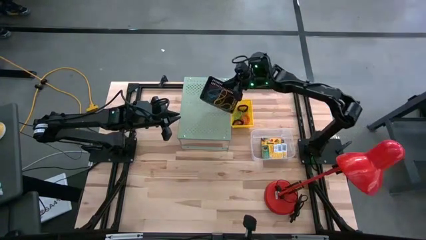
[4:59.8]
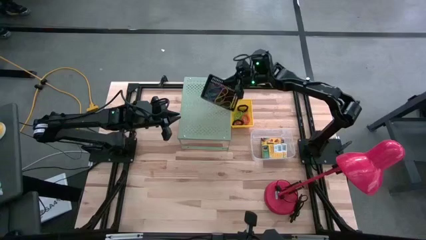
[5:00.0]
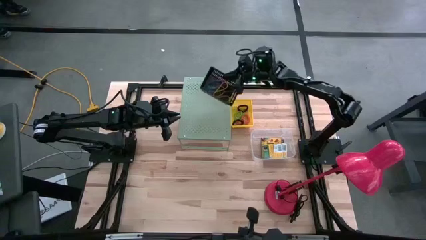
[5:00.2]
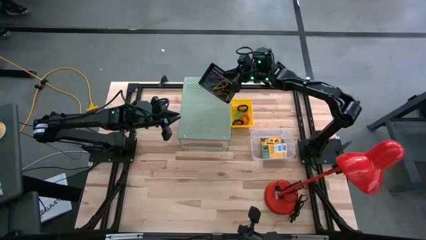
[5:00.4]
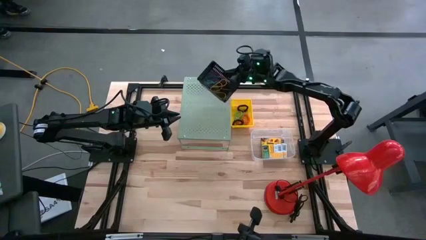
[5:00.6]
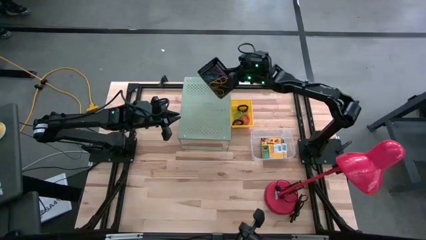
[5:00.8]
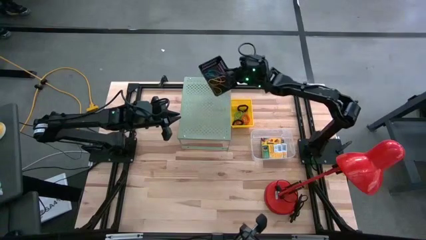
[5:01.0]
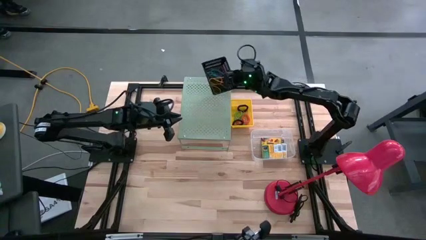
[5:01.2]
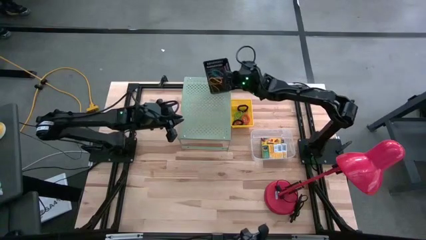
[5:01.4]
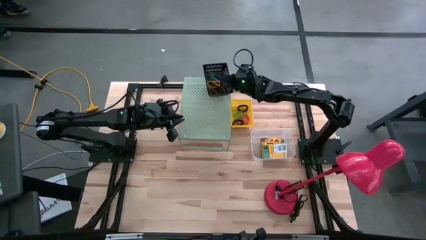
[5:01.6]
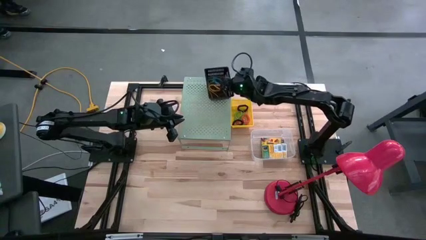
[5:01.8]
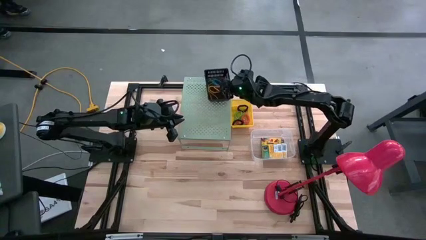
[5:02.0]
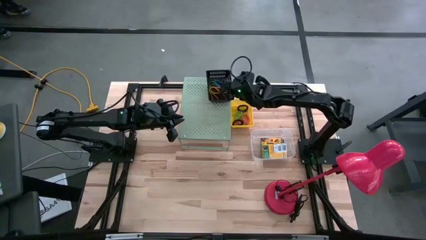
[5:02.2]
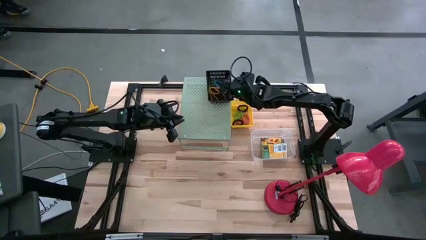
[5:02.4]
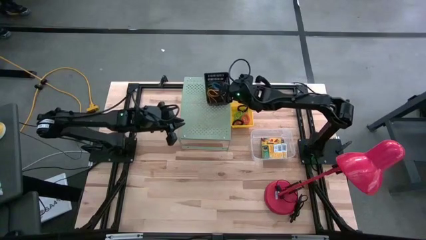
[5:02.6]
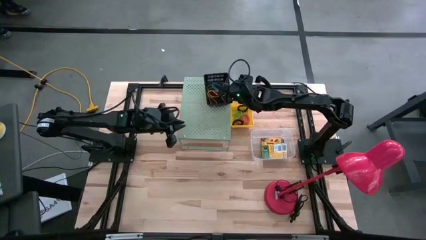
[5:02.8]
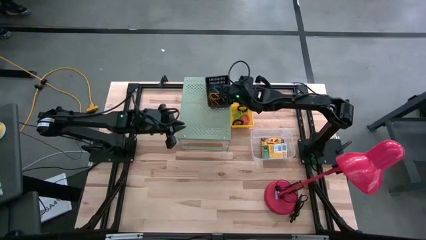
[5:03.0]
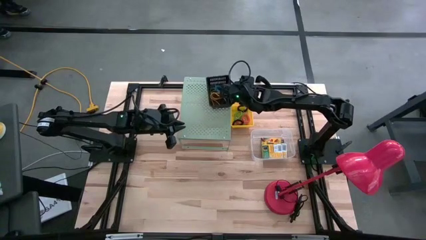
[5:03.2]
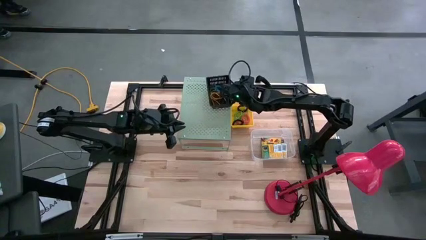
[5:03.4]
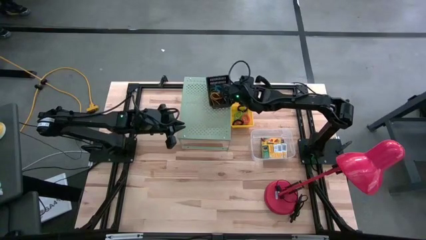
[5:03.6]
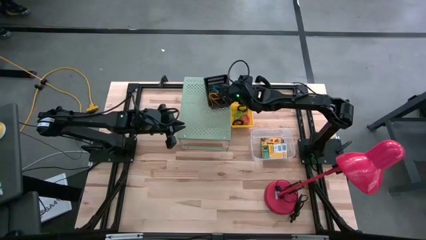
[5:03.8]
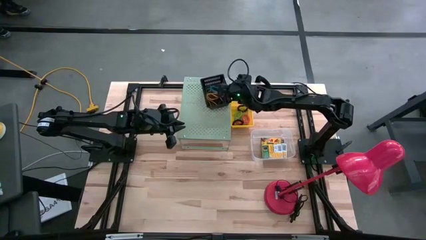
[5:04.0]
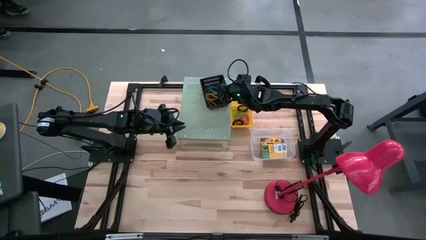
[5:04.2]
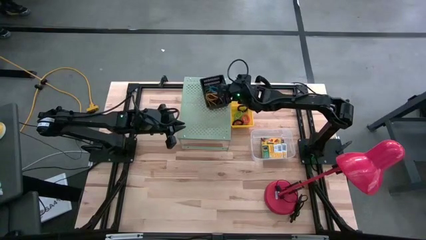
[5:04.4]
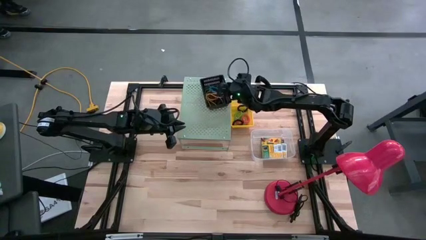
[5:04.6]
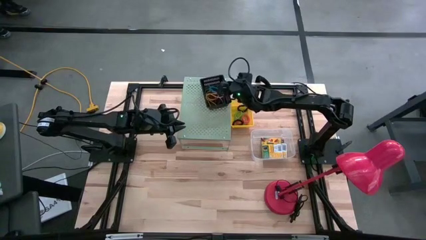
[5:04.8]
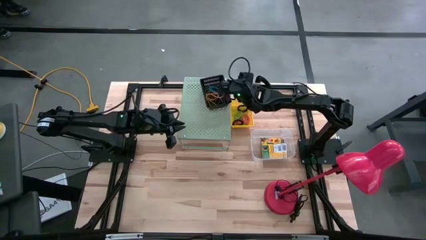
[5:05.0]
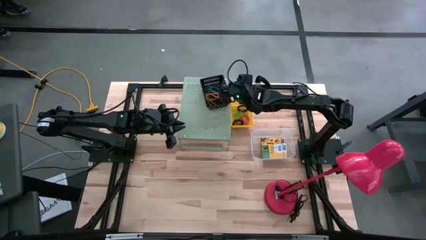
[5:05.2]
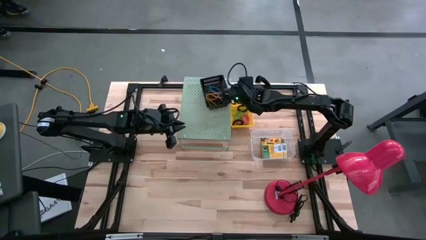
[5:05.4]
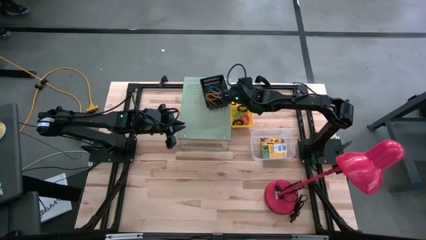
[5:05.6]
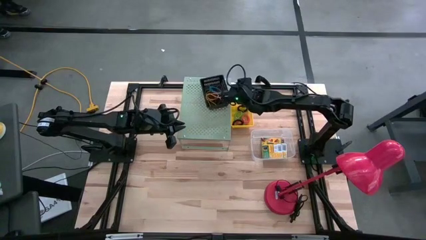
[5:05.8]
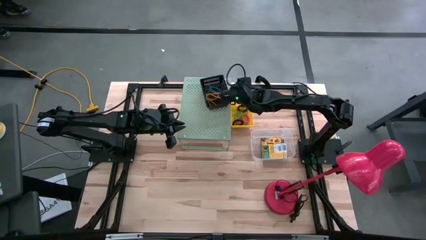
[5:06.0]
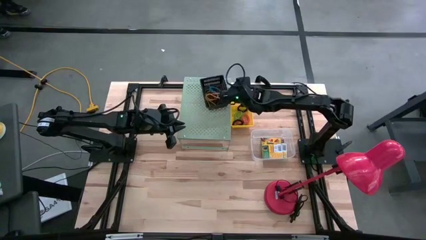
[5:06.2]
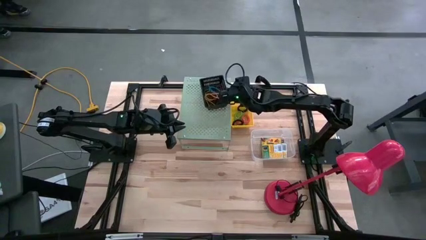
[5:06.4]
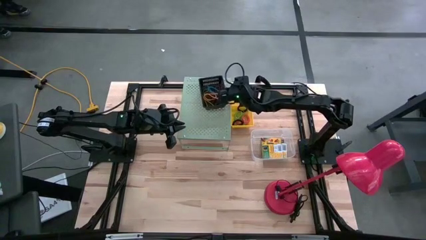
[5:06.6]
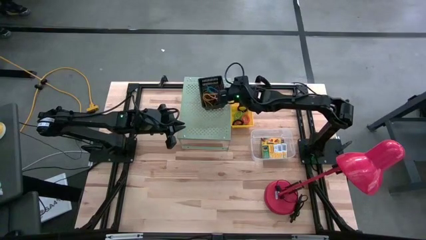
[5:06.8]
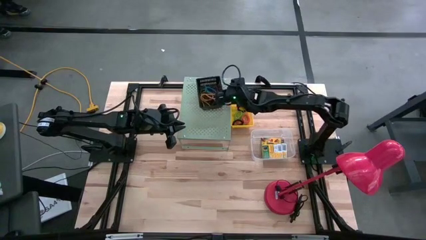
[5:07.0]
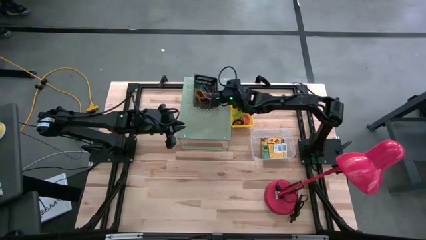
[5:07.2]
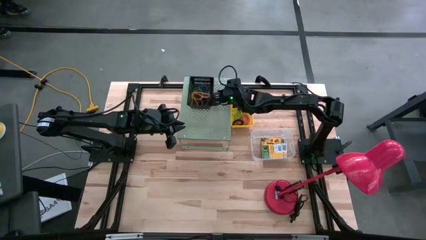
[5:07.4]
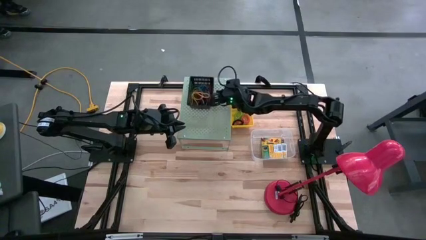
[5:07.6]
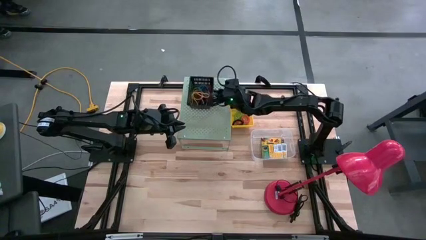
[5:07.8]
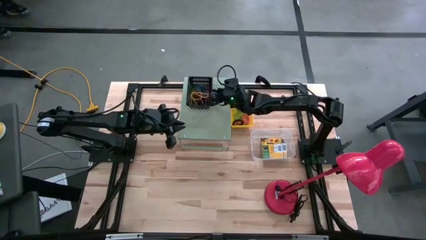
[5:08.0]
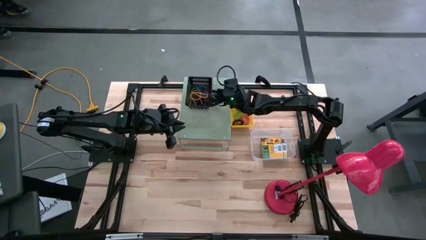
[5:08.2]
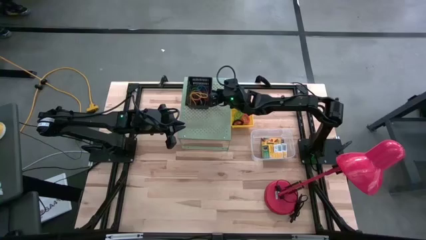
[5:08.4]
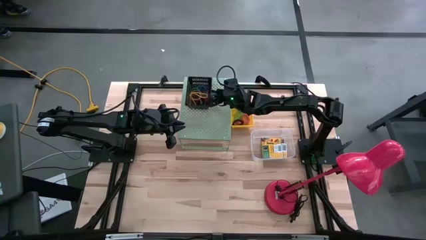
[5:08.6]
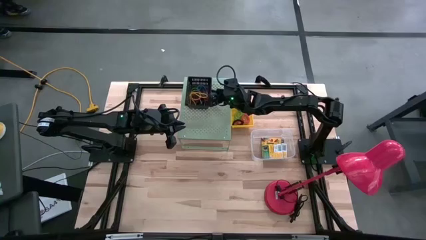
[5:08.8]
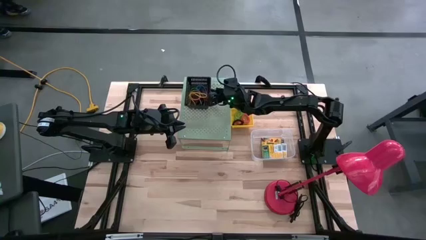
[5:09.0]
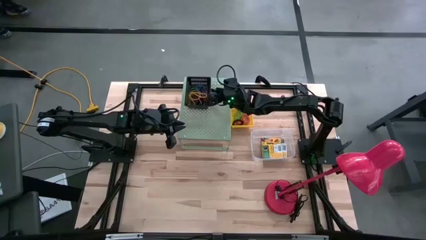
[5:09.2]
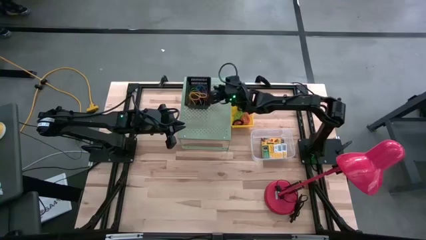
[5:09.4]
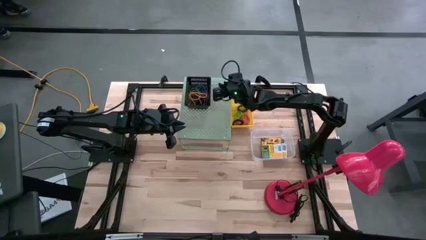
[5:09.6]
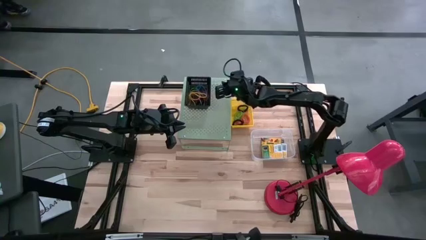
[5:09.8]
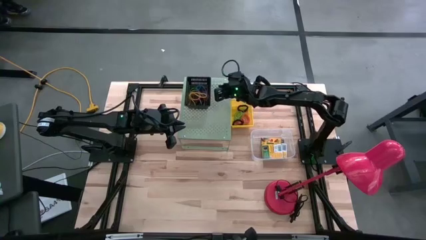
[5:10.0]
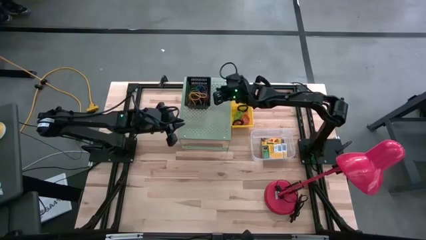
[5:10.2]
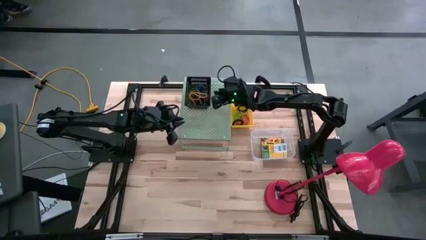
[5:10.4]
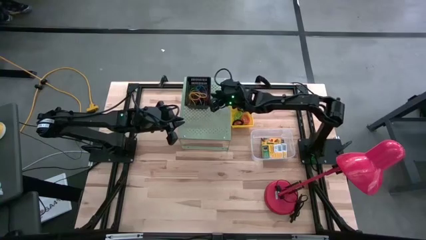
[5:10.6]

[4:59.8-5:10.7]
Task: Pick & Place Office Desk Supplies
Put the black bin with sorted rubber bands on the shelf
